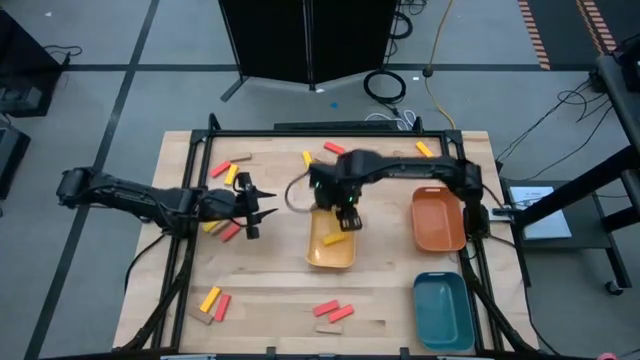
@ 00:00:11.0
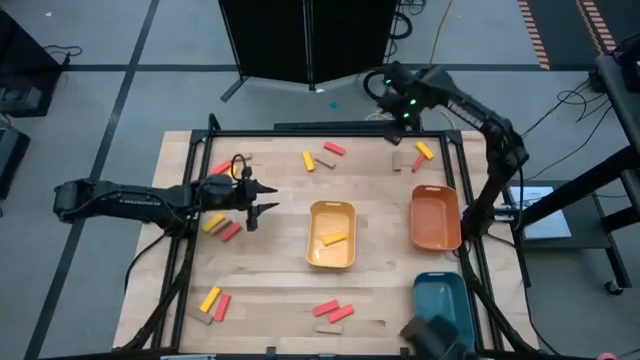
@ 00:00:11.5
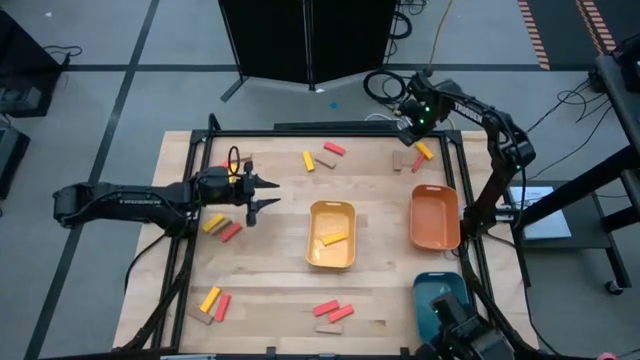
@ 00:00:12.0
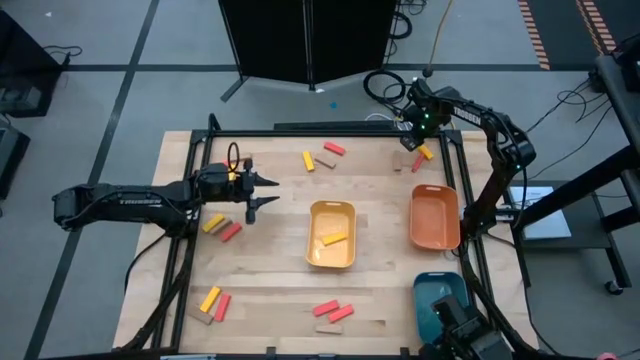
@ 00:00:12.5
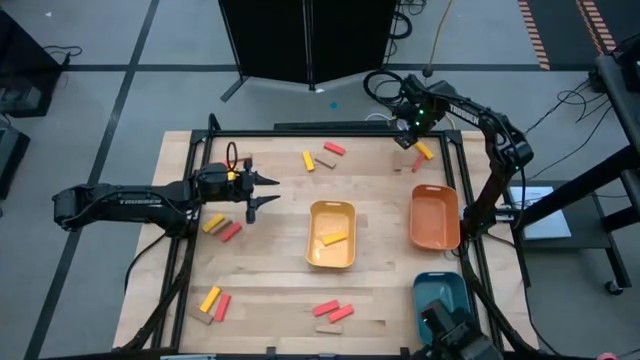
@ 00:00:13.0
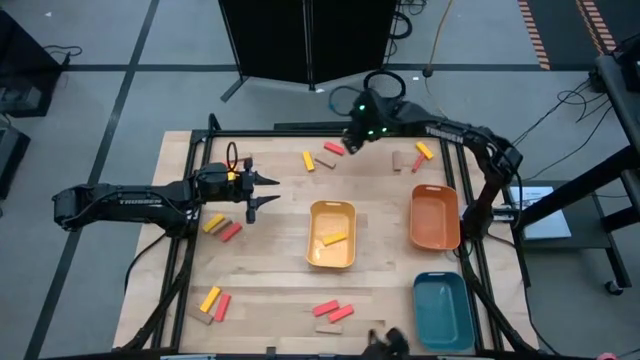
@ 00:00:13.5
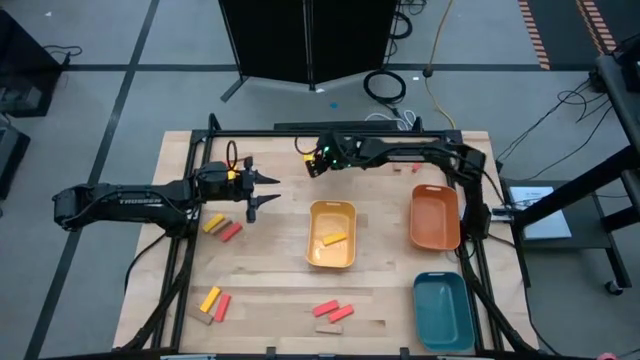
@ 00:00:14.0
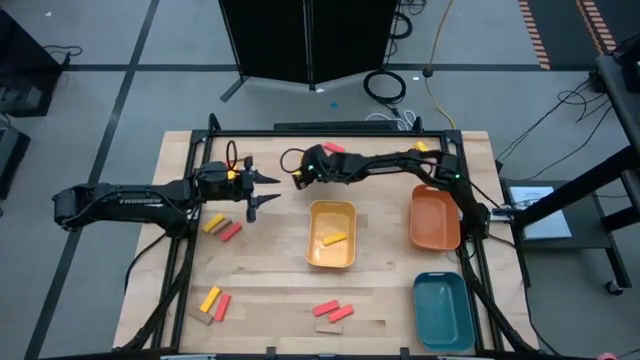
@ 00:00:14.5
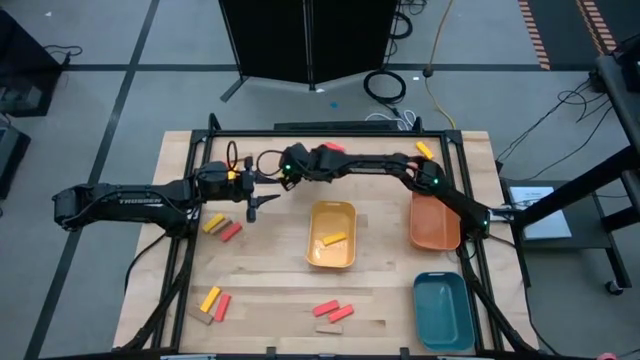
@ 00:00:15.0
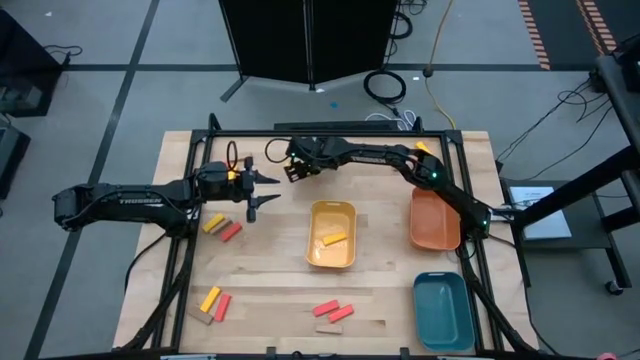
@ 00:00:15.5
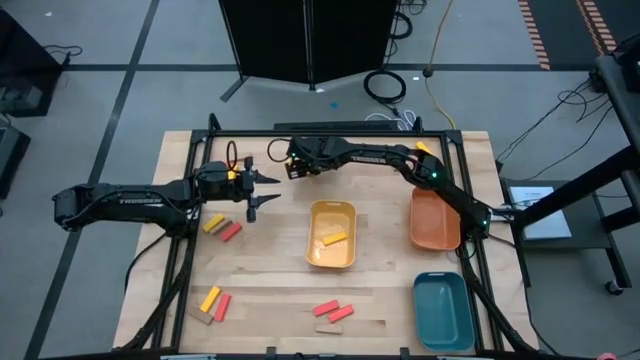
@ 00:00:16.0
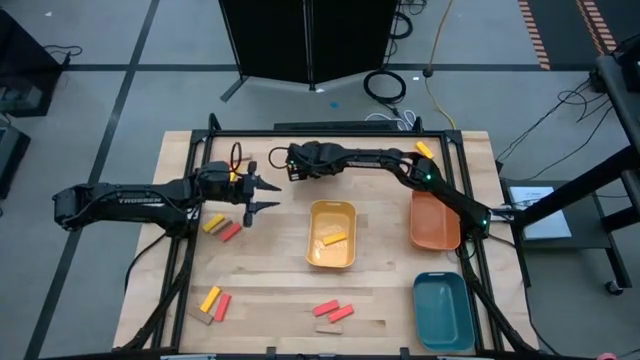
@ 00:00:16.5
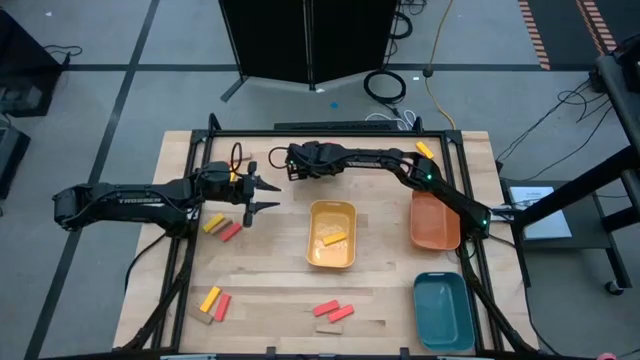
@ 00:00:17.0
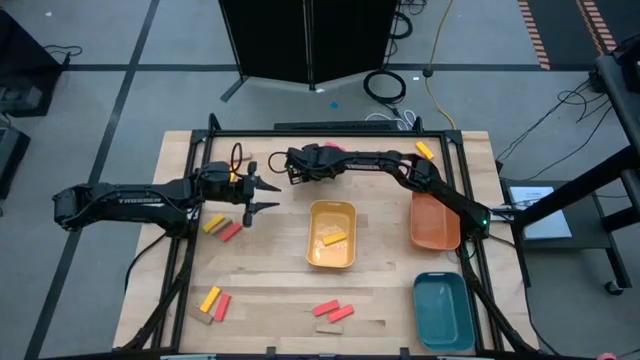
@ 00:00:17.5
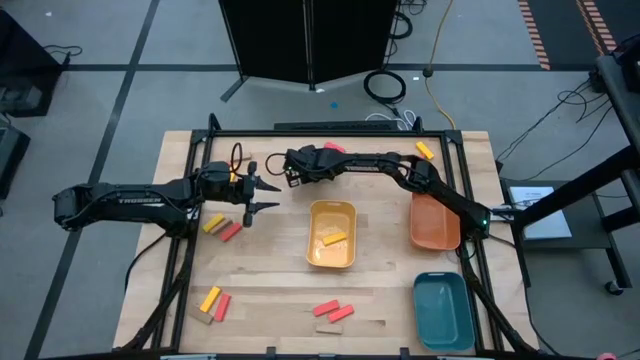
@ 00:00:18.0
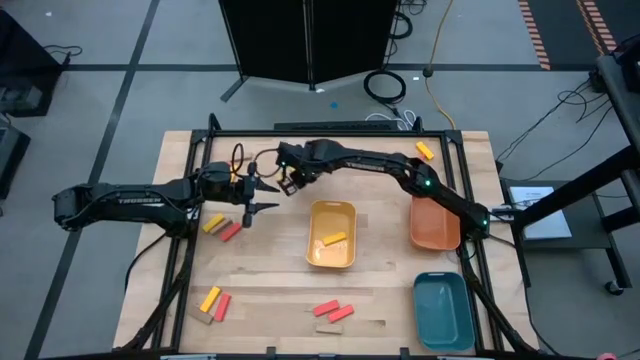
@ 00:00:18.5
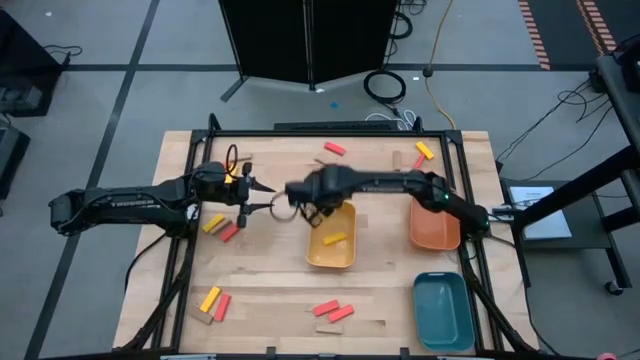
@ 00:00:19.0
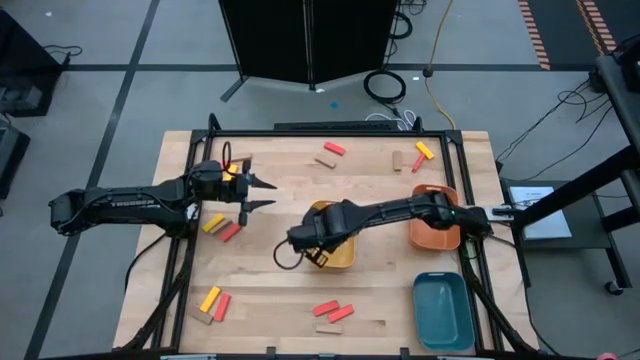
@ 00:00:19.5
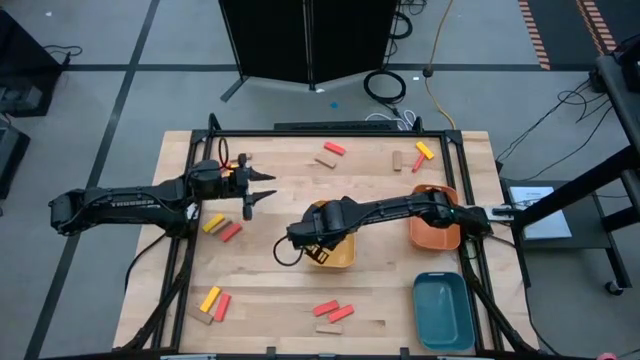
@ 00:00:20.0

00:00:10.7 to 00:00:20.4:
Task: Sort blocks
Put the yellow wooden block into the yellow bin

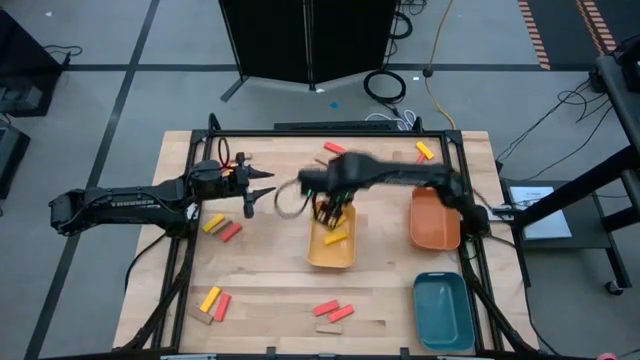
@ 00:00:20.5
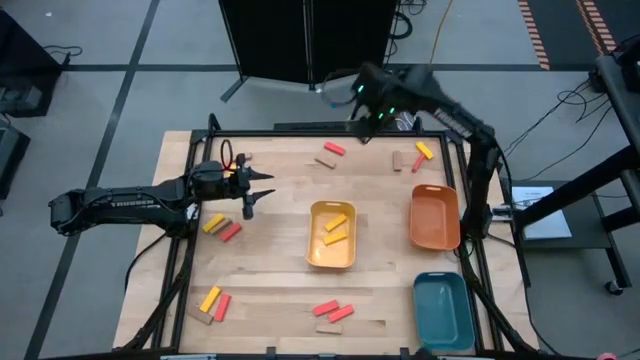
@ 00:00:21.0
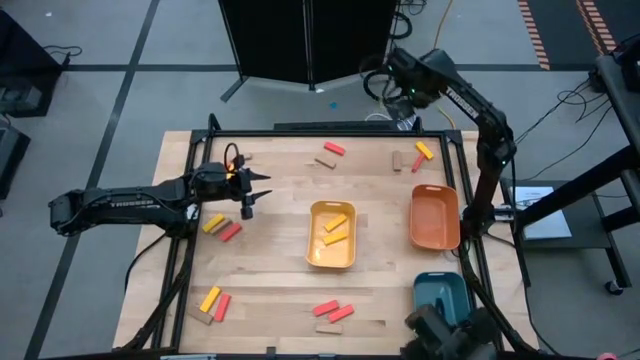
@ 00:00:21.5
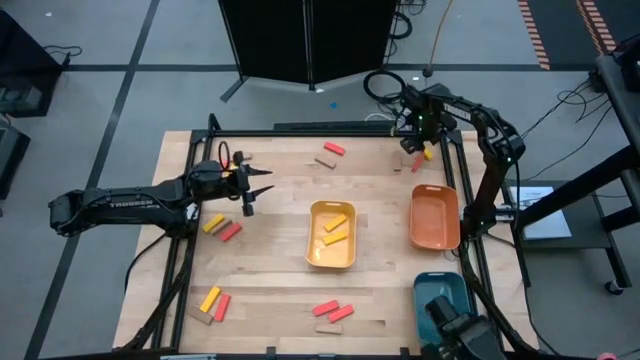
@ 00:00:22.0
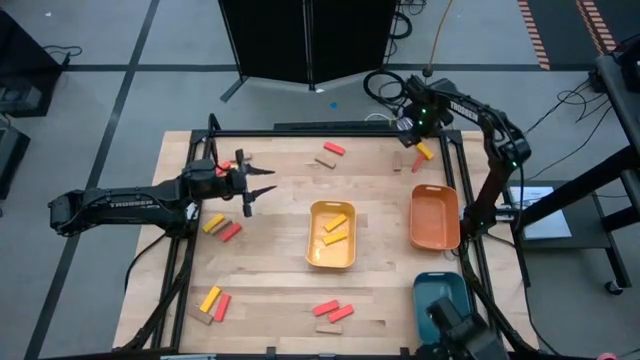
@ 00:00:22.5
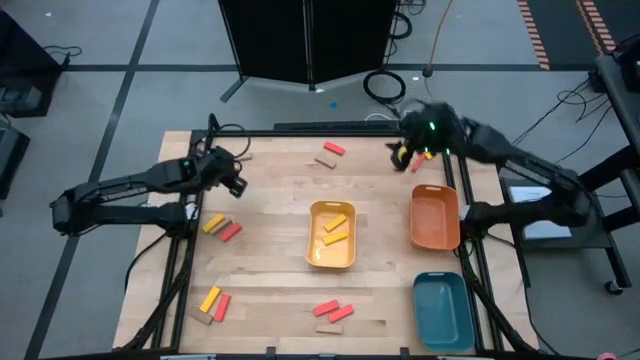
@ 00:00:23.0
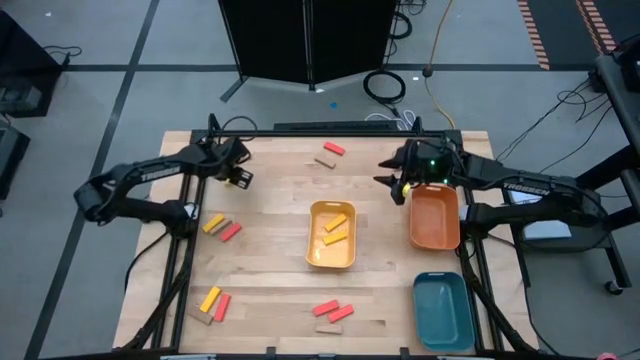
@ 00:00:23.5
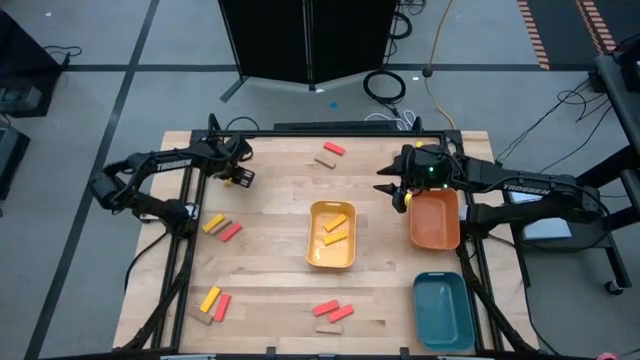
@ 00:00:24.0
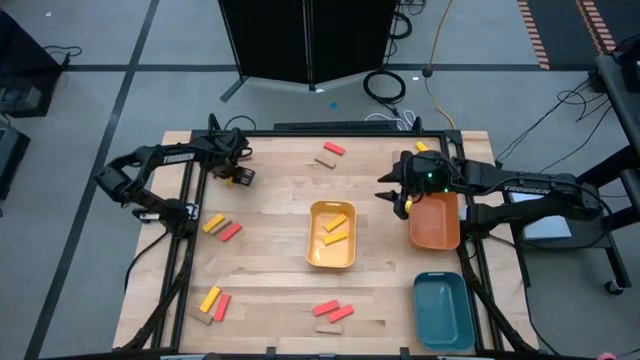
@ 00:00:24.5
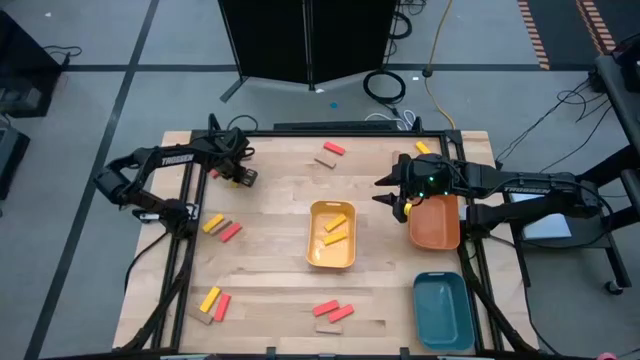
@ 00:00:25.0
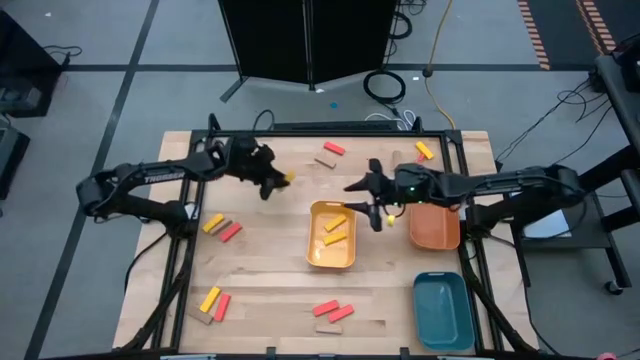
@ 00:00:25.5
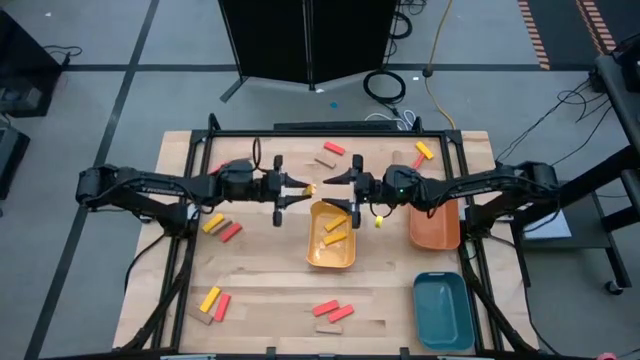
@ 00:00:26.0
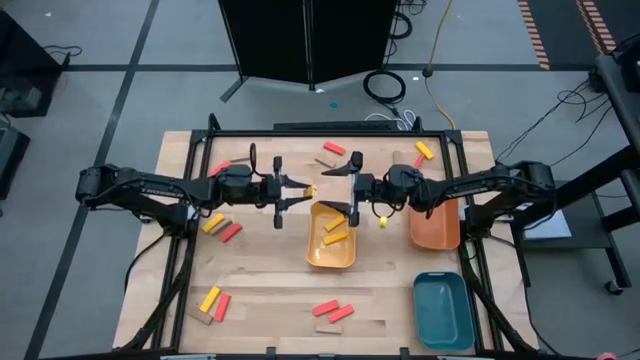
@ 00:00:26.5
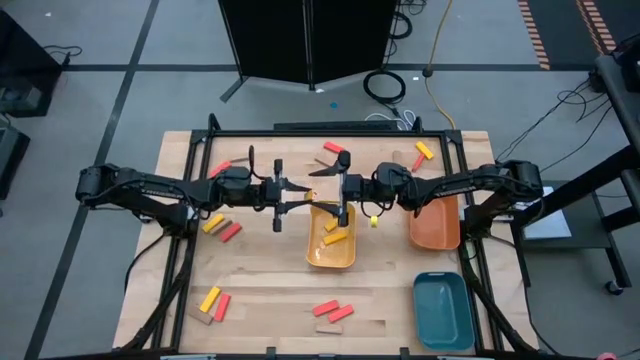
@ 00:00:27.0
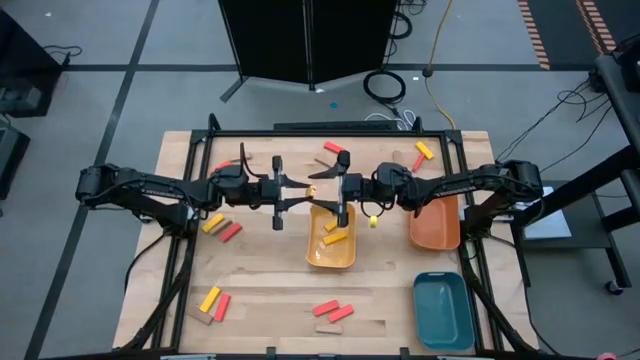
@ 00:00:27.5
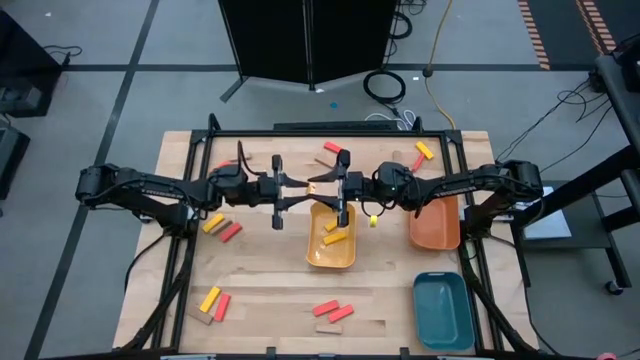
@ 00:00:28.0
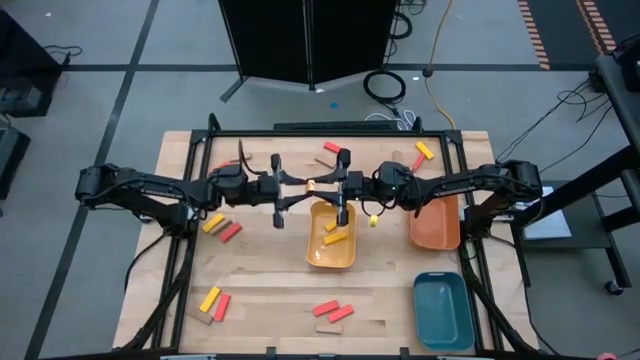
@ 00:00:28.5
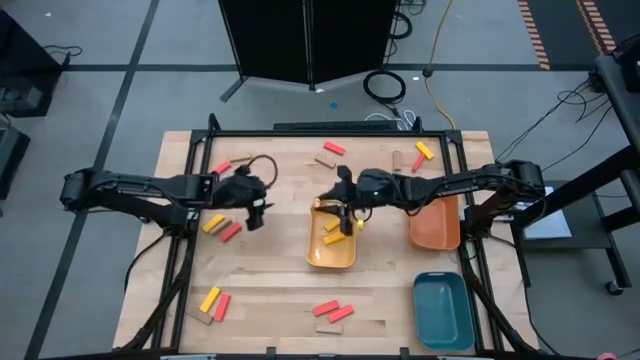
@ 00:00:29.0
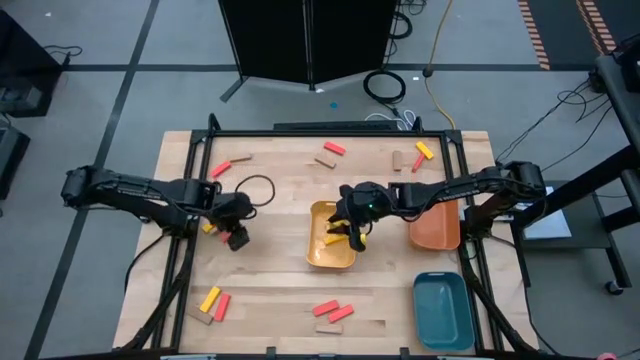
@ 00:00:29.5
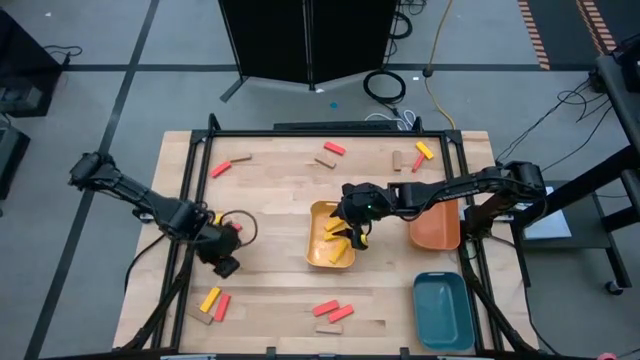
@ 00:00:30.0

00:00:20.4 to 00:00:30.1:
Put the yellow wooden block into the yellow bin

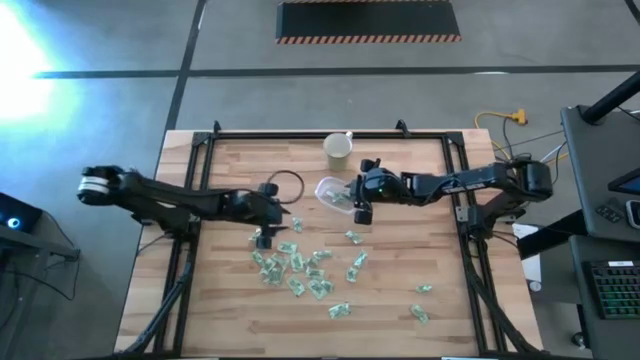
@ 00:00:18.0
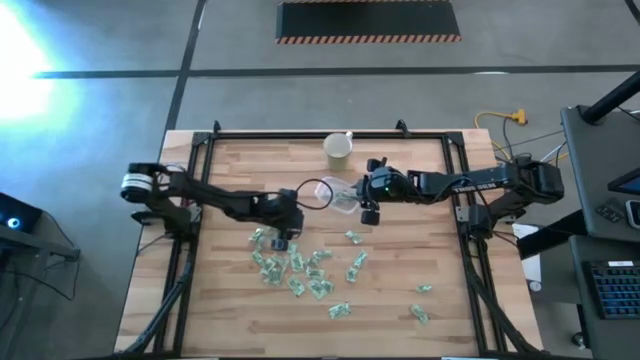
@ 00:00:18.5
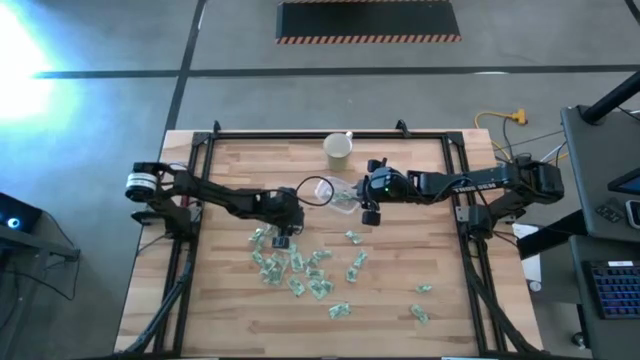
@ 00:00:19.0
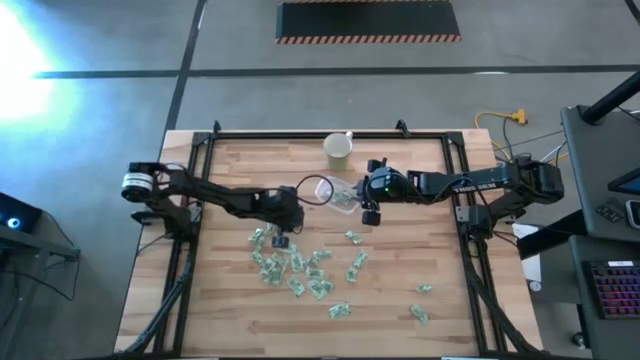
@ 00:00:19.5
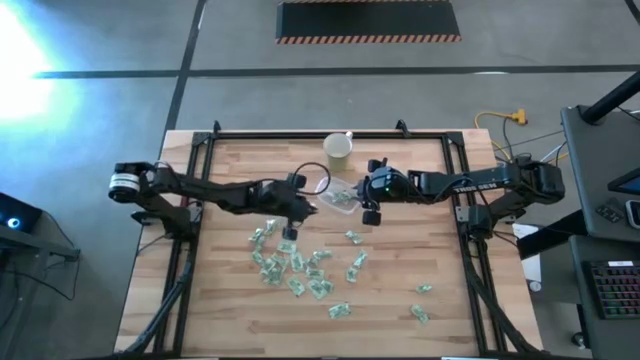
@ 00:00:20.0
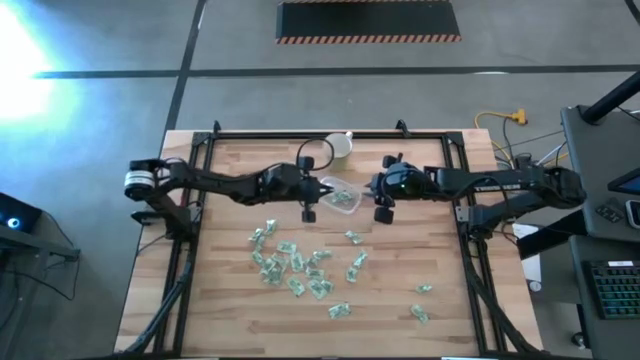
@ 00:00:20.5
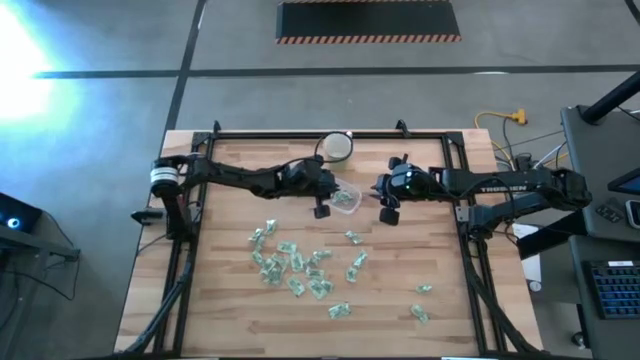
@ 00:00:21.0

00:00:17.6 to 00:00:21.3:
Task: Pick and place items into bin
Put the green stevia packet into the transparent bin
